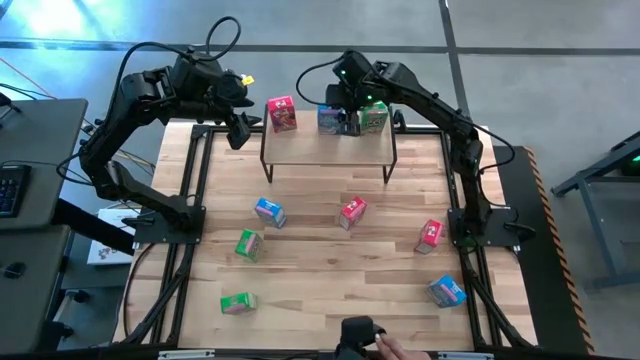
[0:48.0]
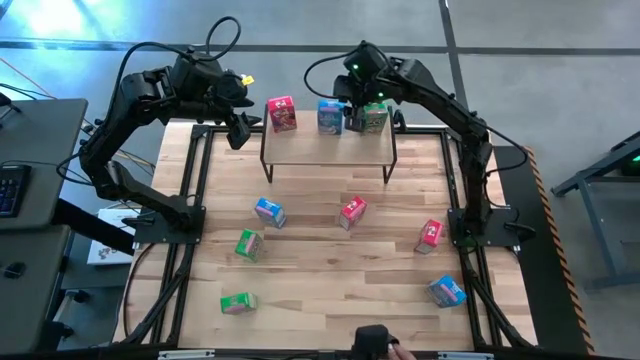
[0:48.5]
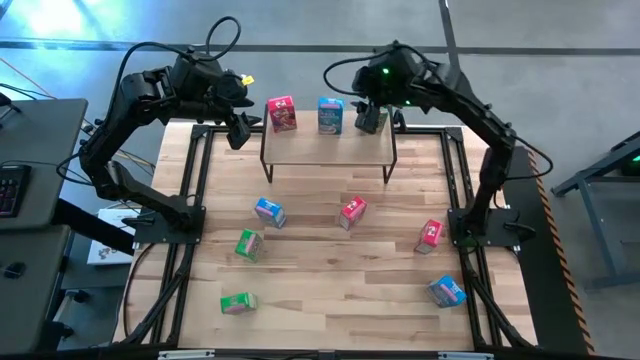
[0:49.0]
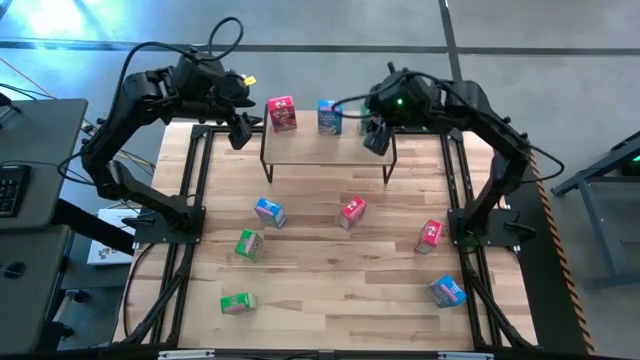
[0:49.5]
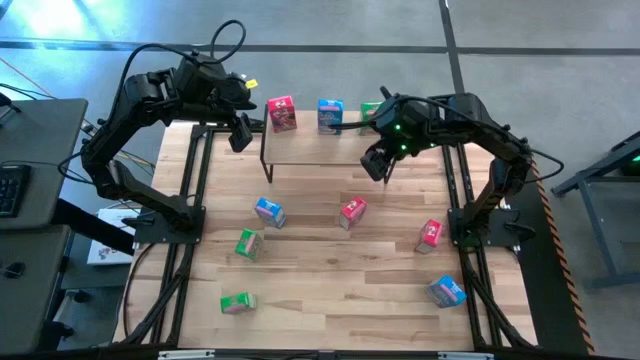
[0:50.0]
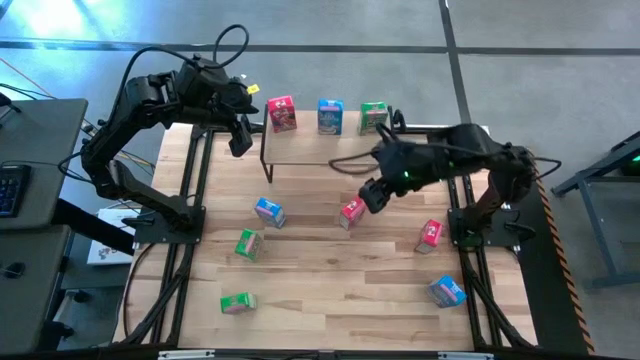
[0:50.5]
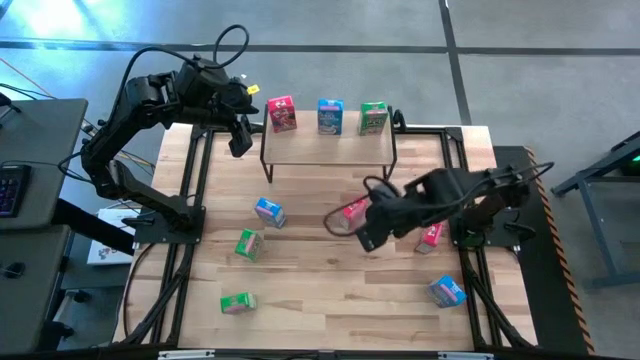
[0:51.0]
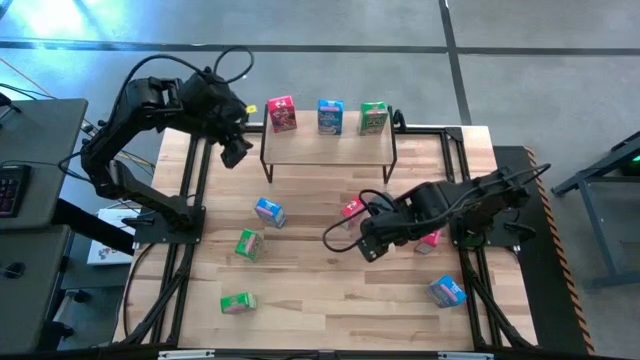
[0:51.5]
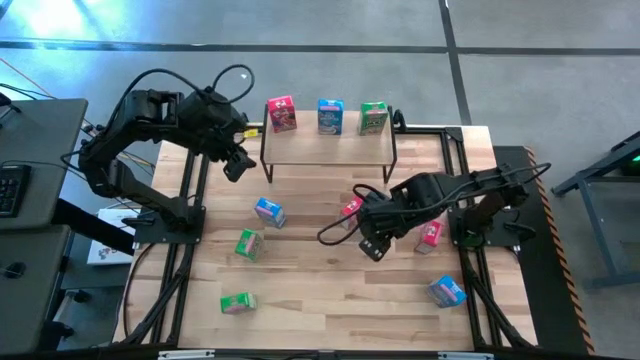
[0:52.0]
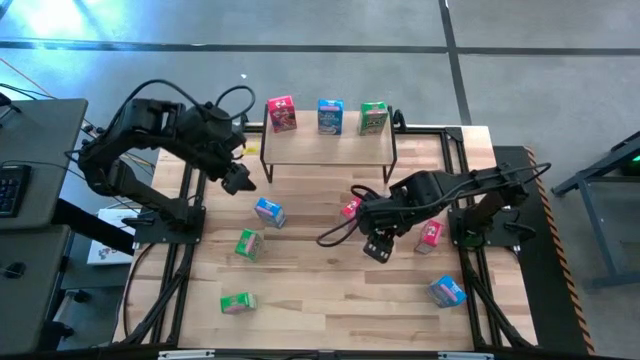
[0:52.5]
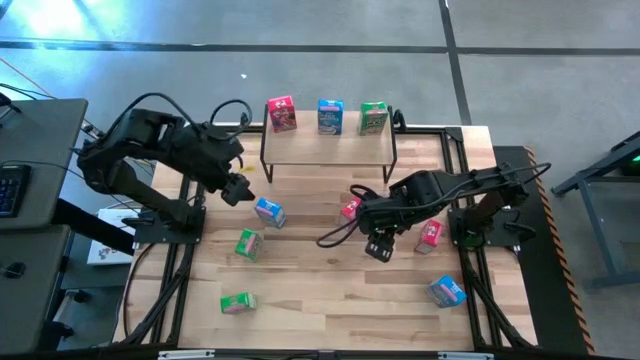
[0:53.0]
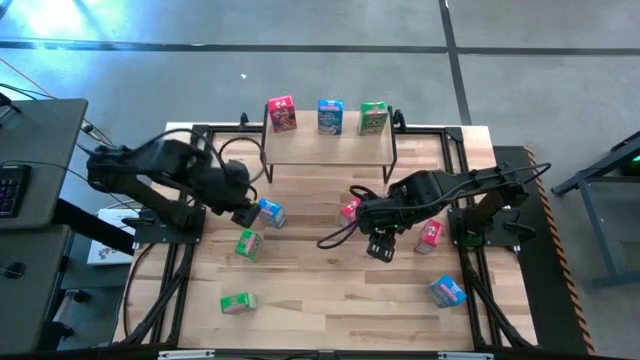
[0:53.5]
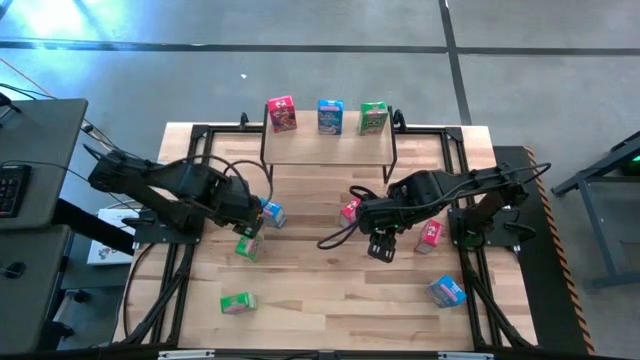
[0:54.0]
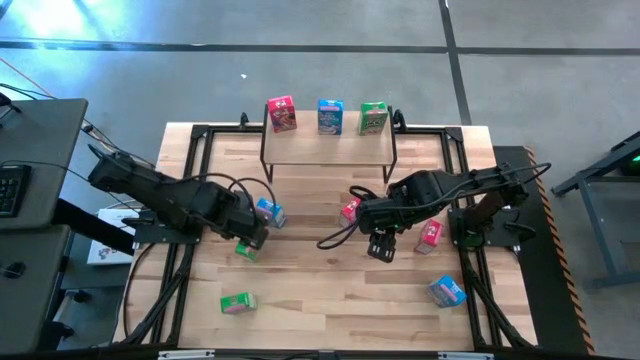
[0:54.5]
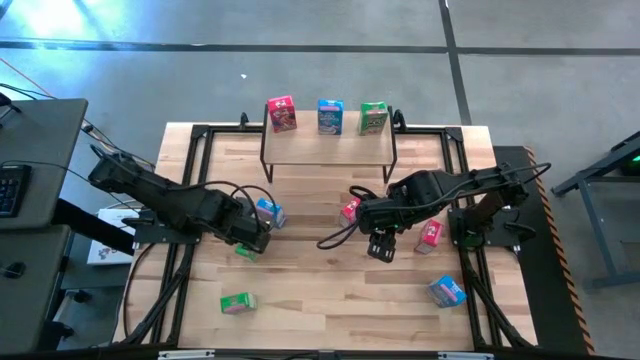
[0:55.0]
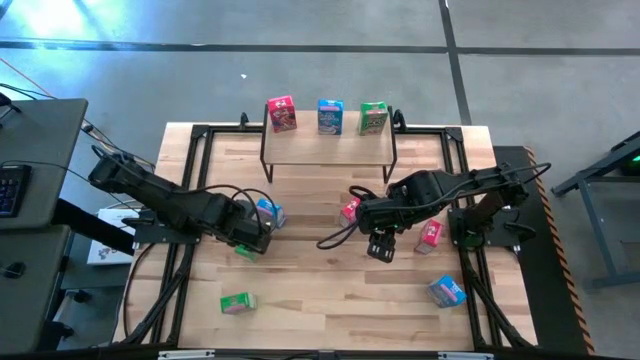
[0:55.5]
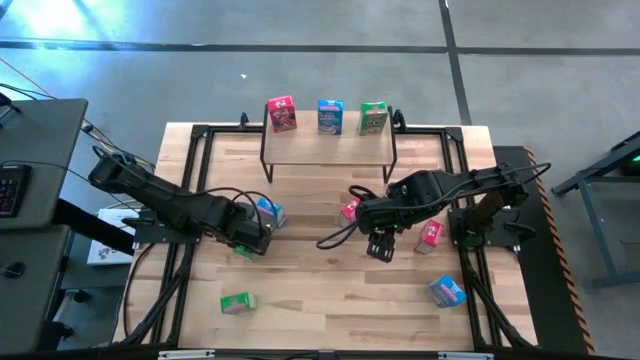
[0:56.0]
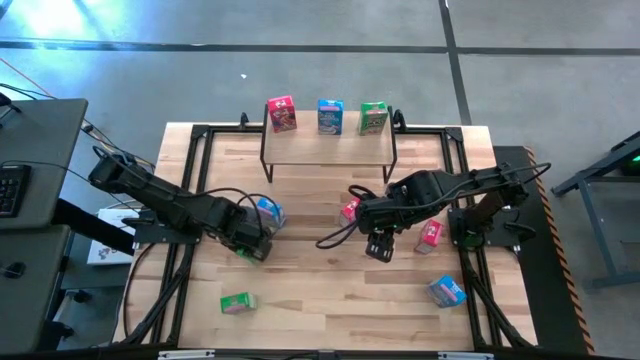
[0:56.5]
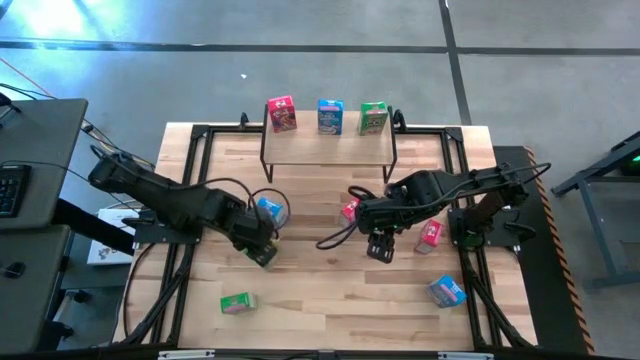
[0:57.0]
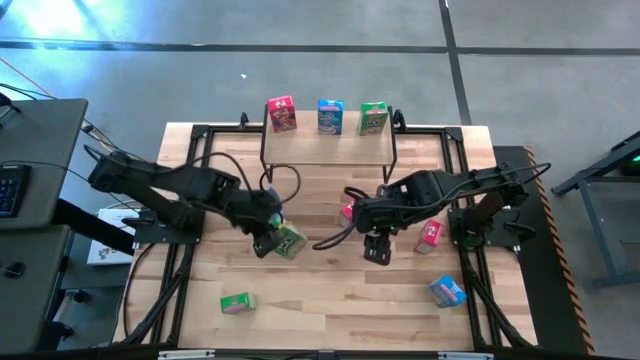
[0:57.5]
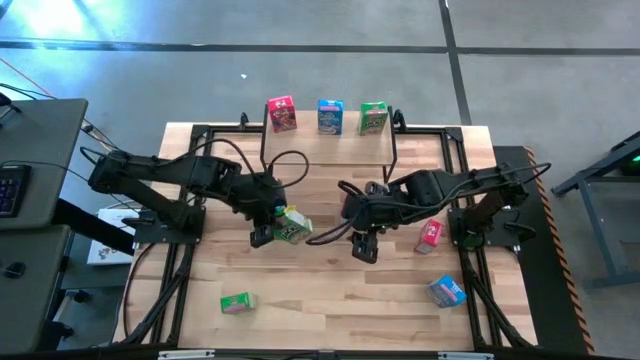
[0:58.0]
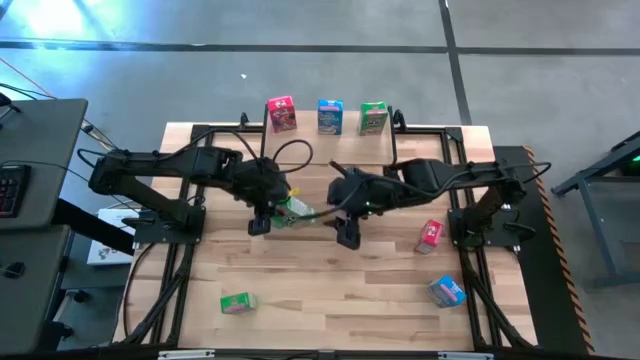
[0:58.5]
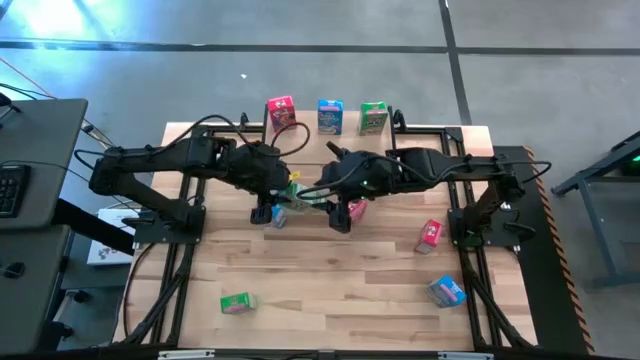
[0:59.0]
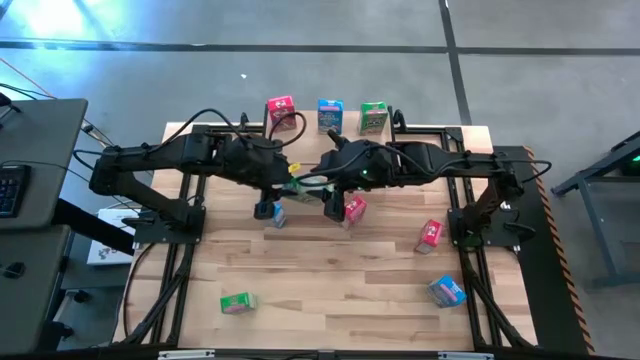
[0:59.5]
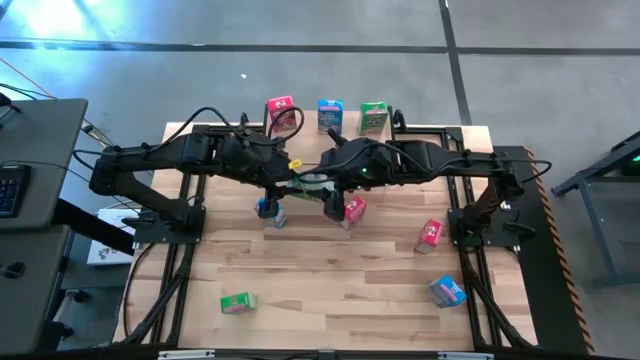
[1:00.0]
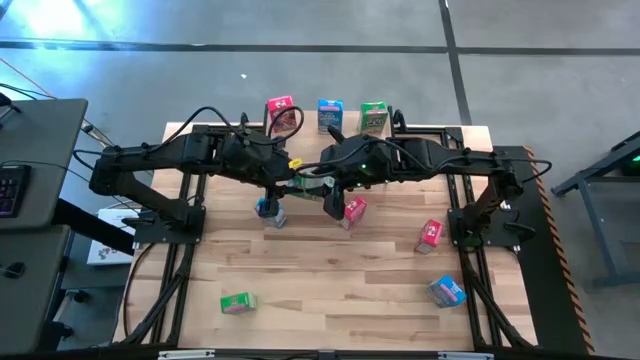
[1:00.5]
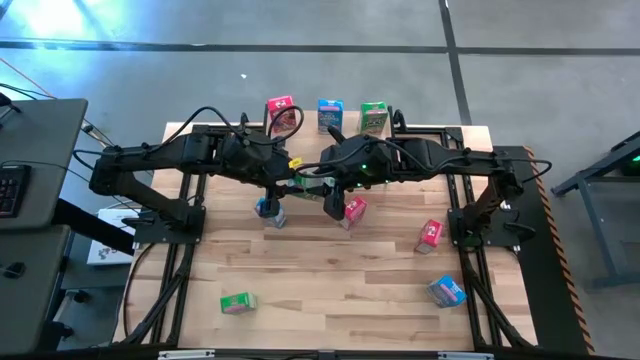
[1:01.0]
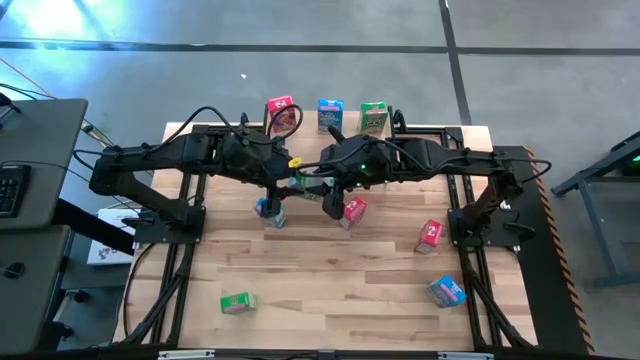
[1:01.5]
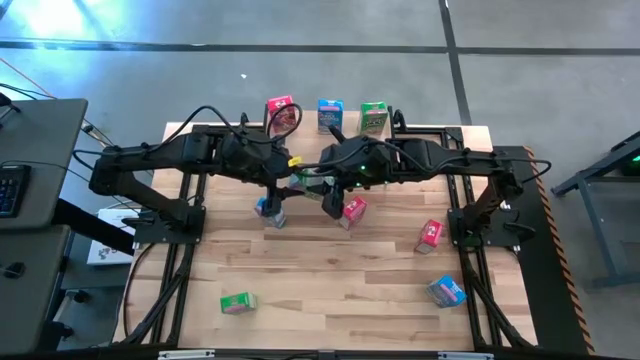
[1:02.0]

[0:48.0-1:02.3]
Task: Stack cereal on shelf
Put the top green cereal box on the shelf aligned with the other green cereal box

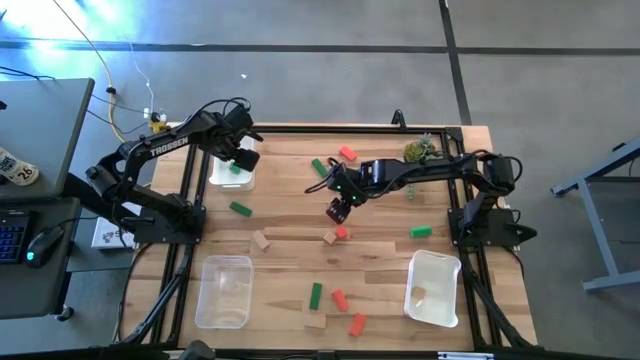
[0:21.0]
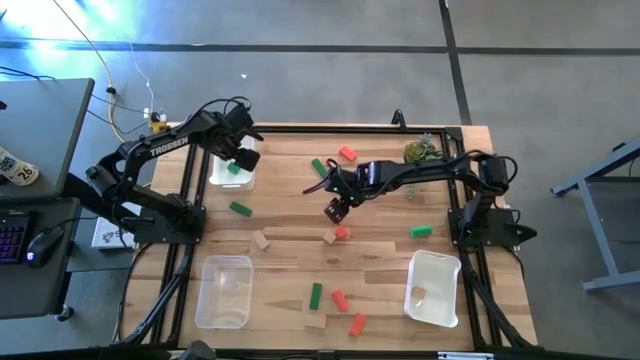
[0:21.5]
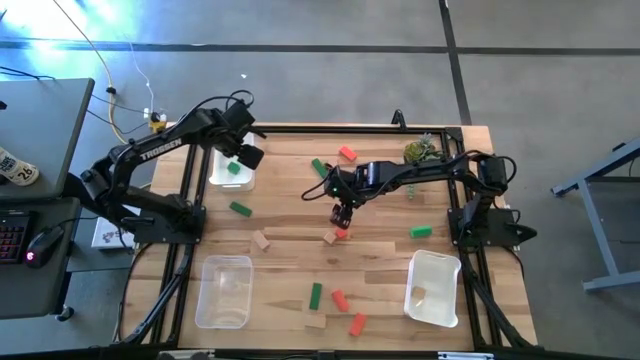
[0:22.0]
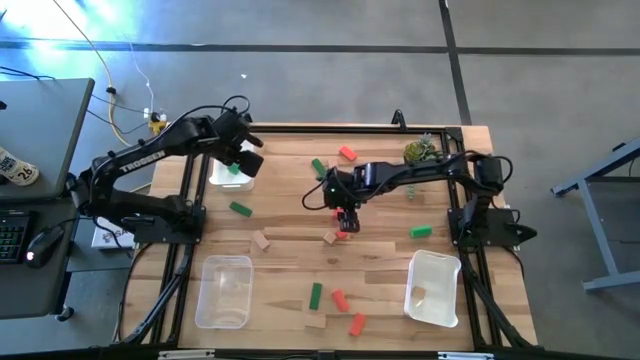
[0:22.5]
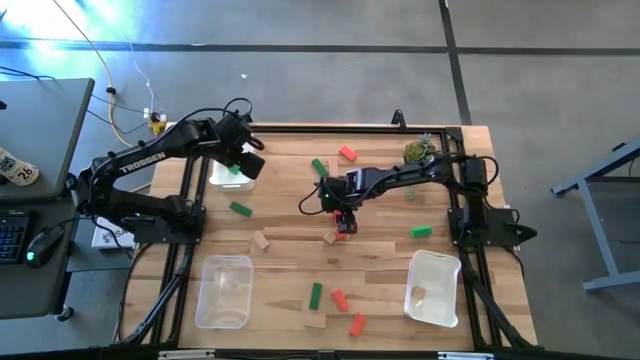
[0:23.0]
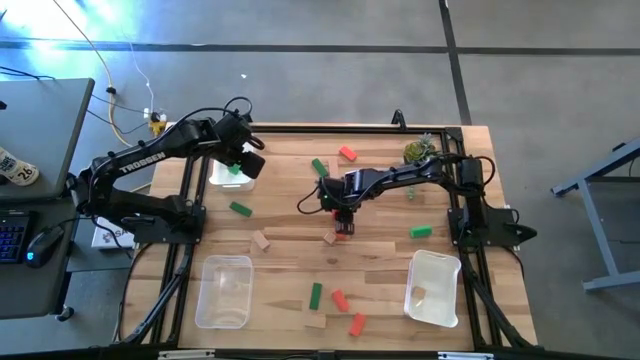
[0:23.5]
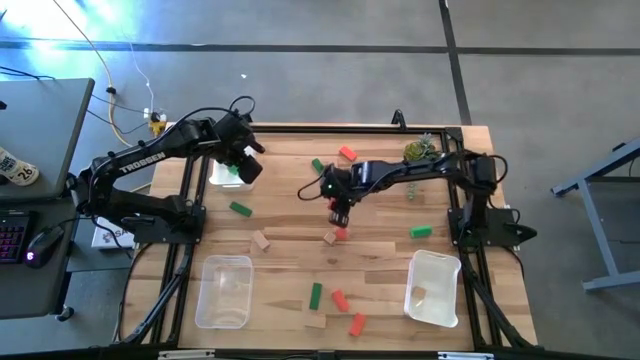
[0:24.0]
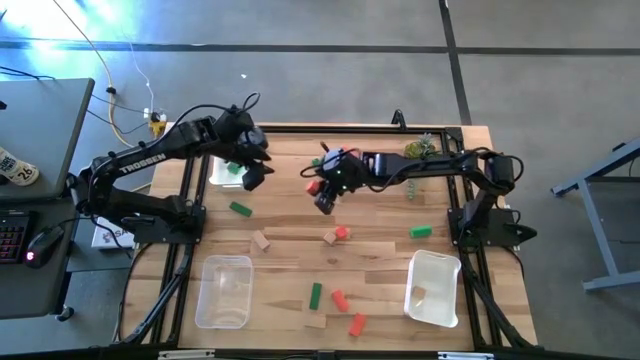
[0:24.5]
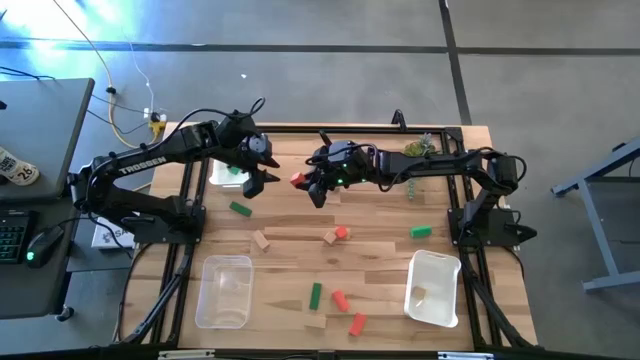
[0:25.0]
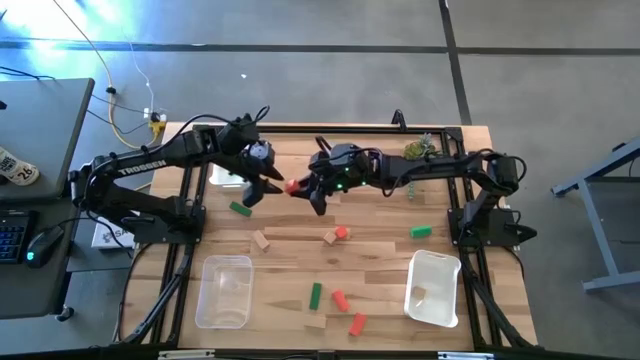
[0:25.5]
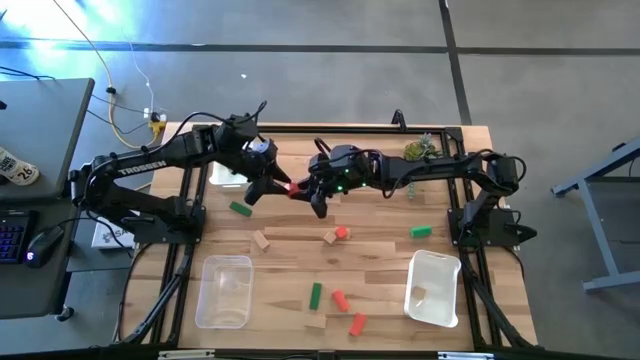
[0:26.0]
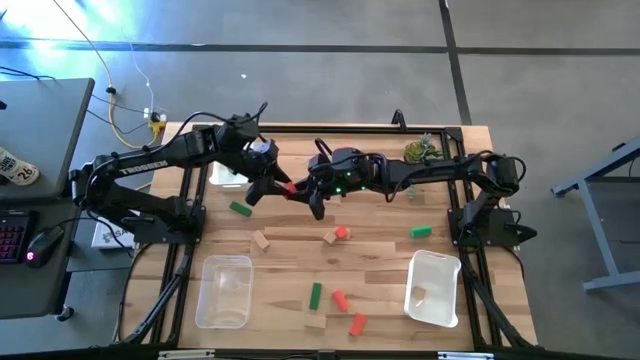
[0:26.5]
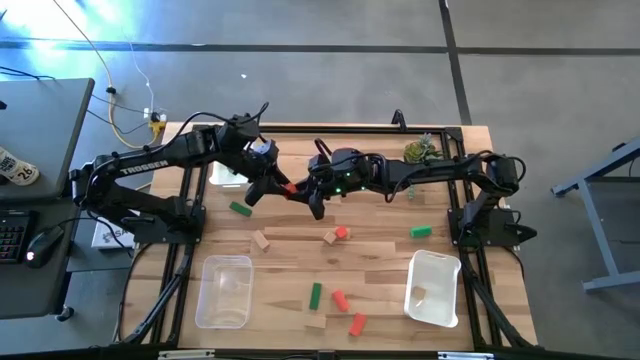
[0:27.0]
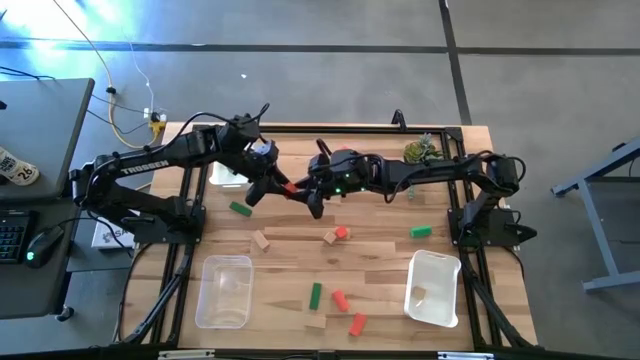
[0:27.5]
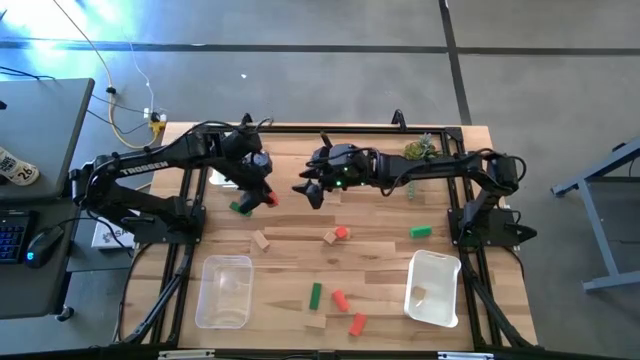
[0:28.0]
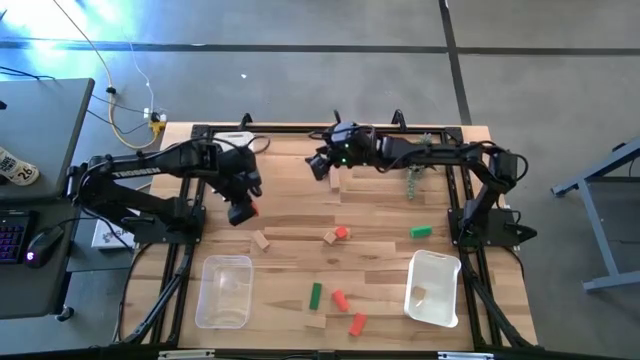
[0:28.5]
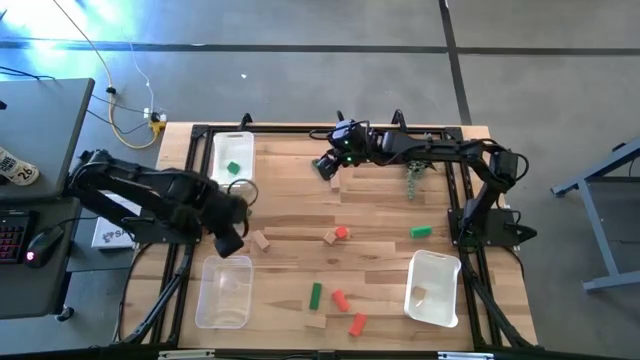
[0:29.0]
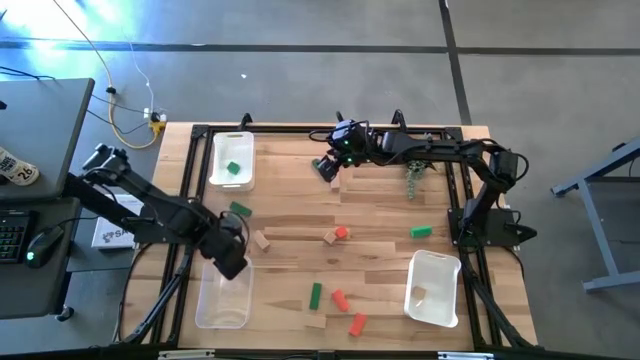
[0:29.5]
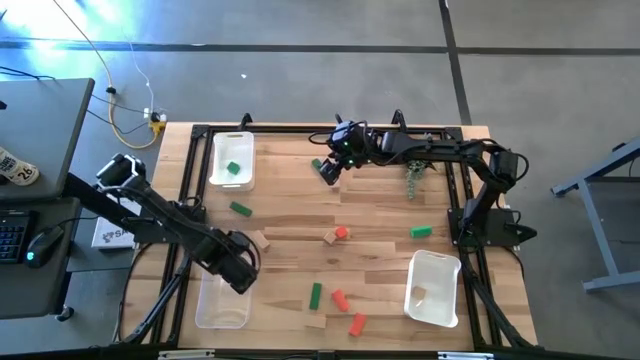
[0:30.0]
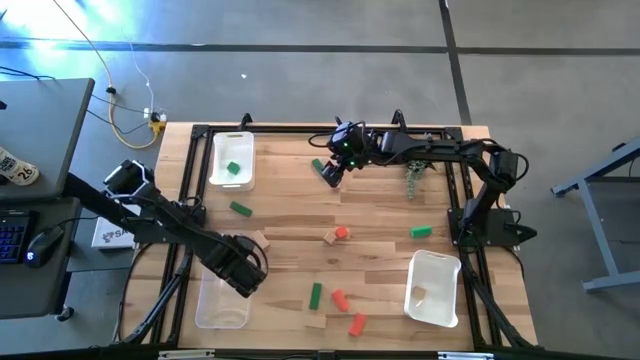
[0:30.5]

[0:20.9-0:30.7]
Task: Sort & place blocks by color
Put the orange block into the transparent bin
